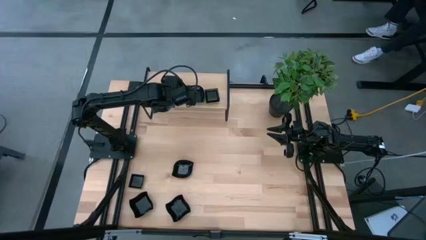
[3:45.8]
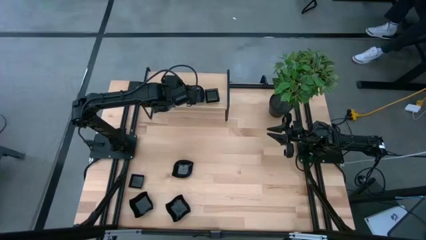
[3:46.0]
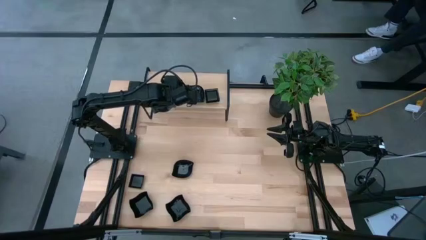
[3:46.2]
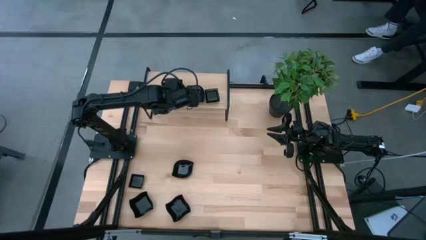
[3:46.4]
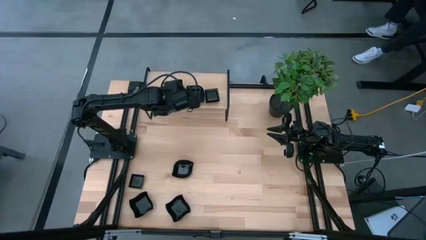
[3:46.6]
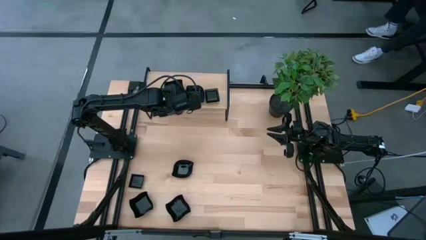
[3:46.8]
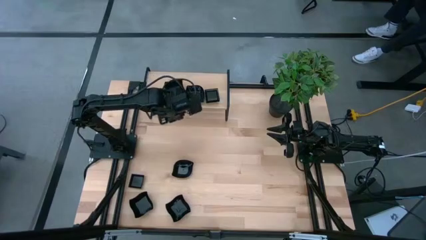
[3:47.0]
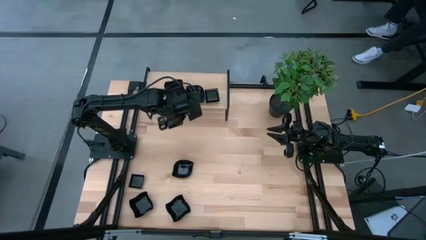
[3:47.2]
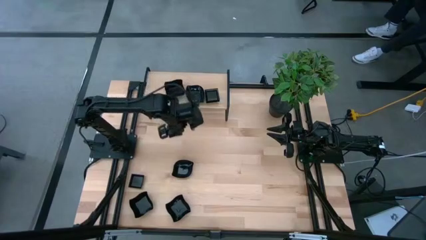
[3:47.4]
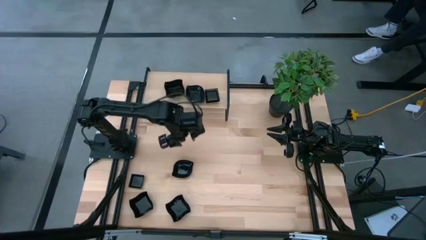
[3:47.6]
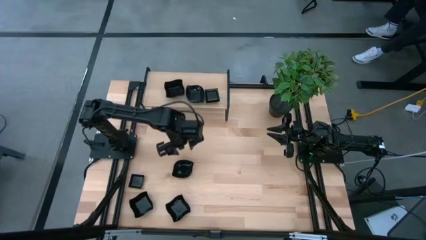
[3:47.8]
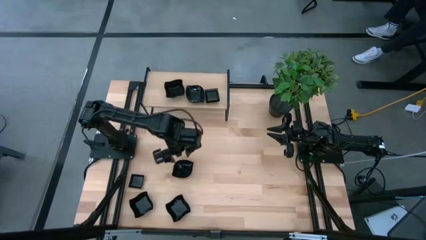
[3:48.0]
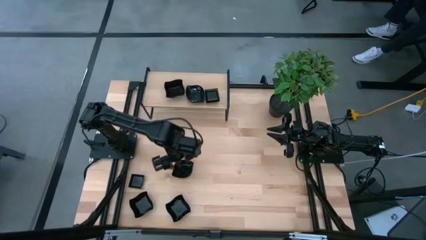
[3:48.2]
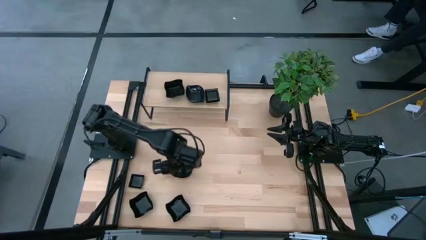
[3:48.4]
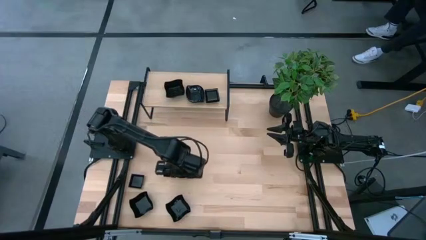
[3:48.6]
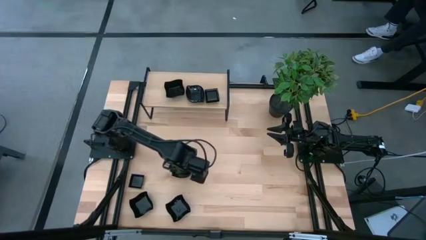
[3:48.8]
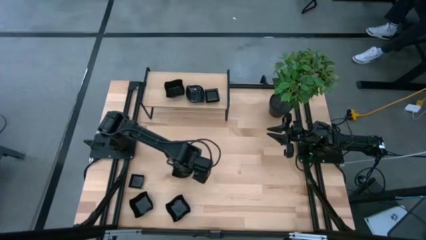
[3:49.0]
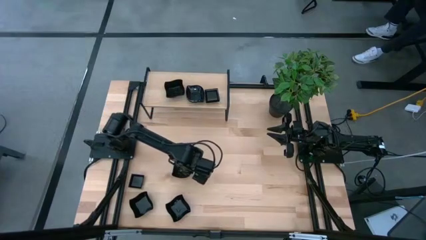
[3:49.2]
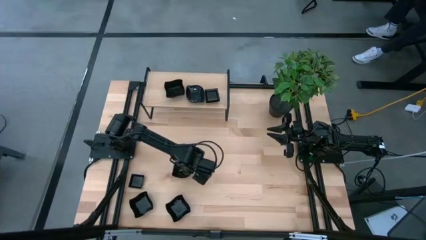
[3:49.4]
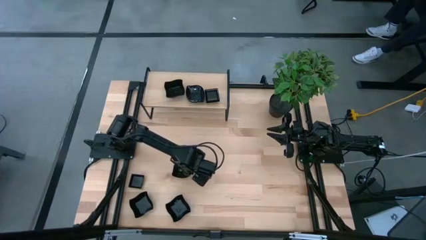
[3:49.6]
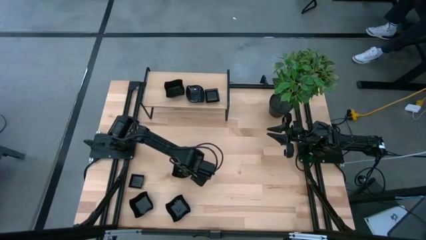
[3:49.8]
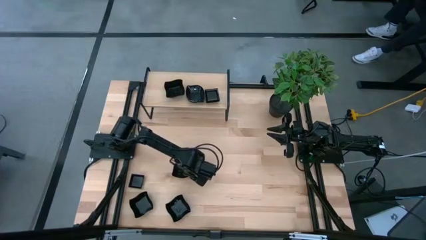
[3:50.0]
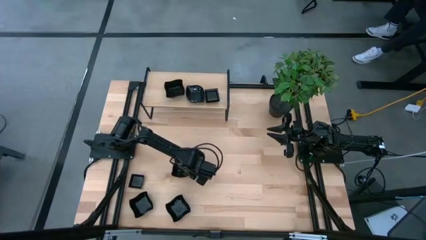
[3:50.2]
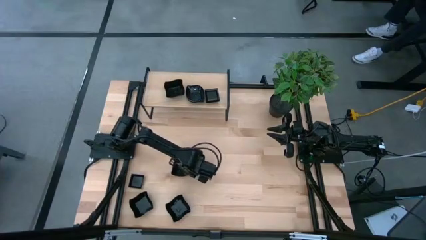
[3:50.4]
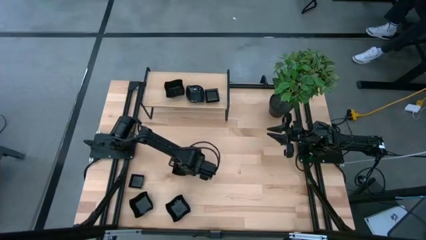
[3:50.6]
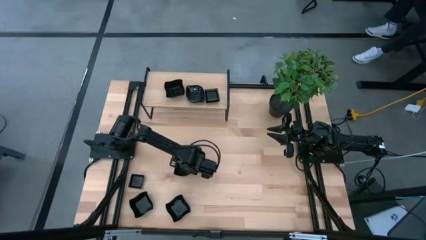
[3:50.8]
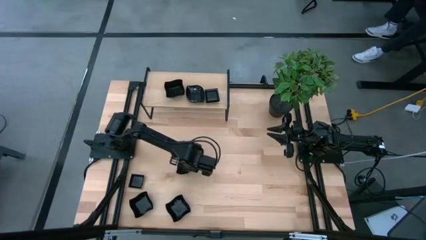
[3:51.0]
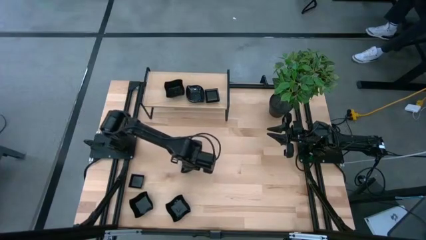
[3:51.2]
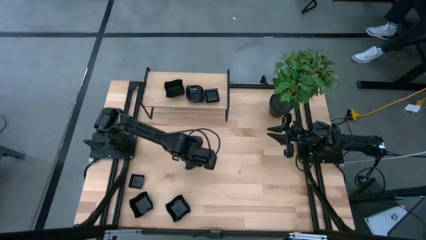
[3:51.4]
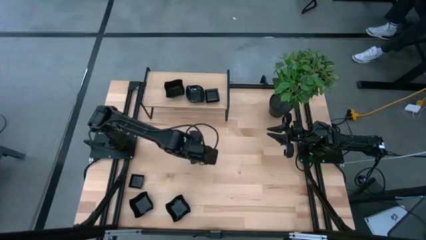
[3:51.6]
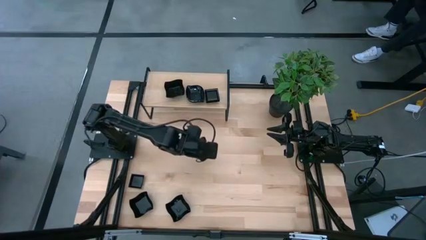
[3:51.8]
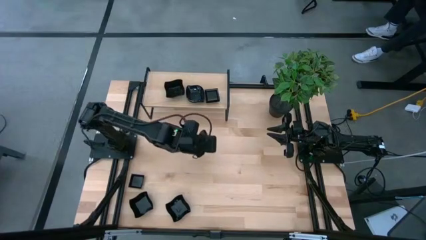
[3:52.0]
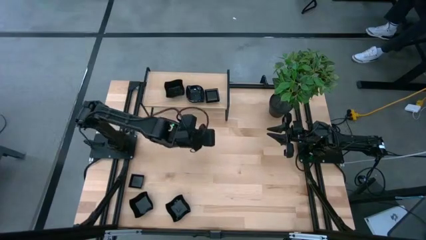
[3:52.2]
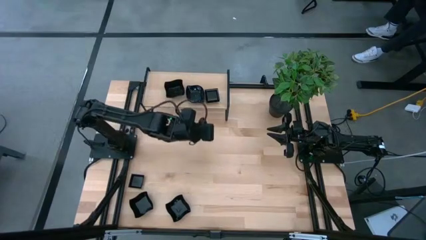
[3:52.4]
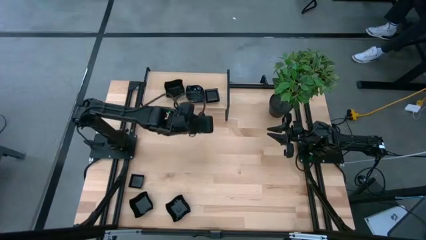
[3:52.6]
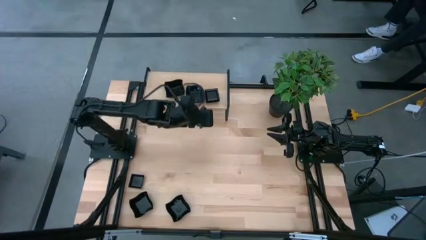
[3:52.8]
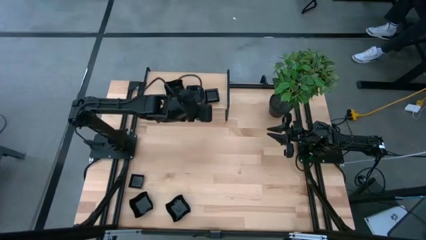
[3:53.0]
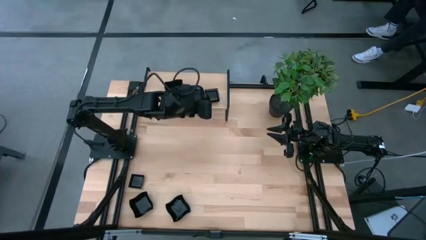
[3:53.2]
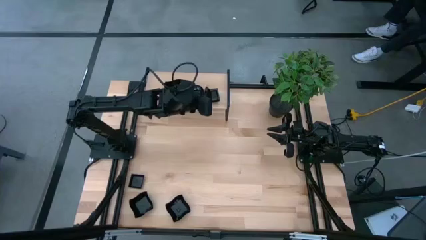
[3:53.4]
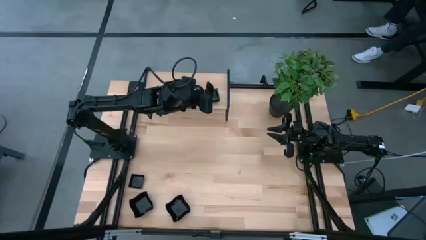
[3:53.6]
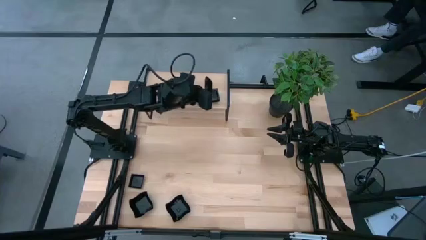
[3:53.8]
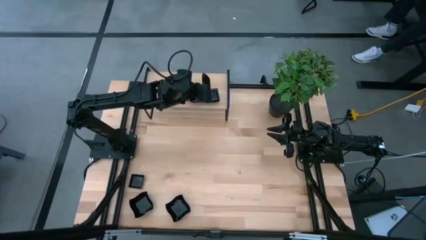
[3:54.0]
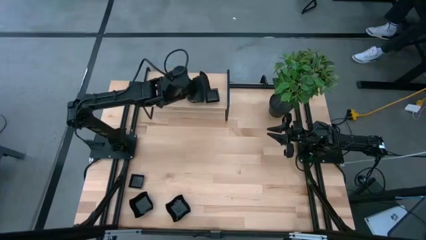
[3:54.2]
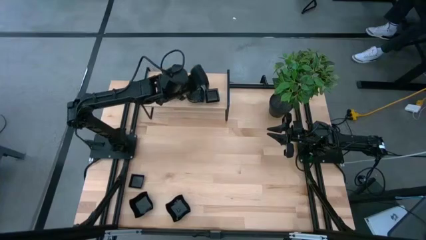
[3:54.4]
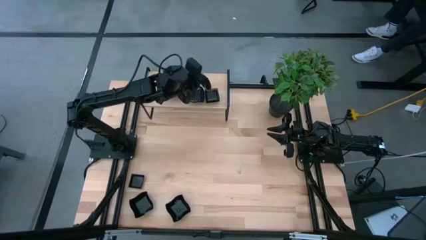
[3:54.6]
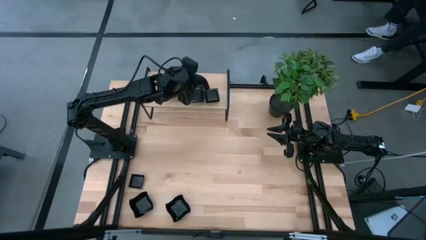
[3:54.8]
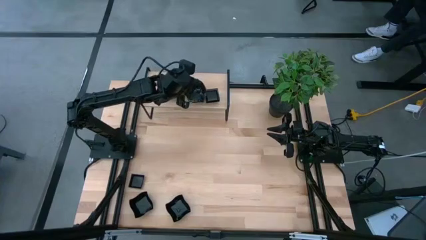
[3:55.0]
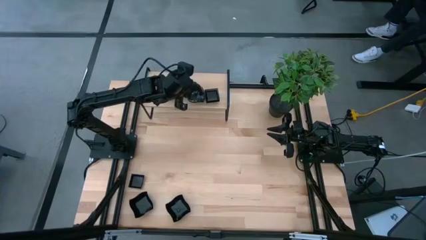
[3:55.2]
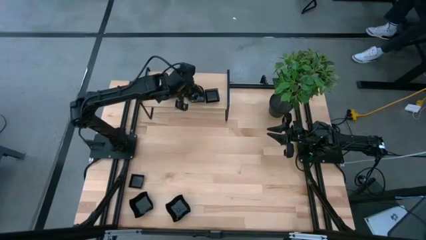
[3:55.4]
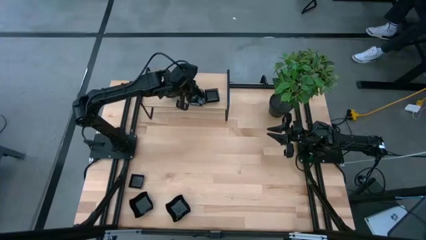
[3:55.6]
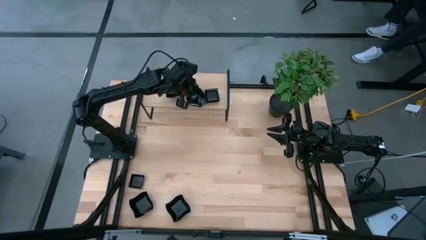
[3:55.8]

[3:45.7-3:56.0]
Task: Pick & Place Mini shaped plates
Stack the leaf shaped plate on top of the leaf shaped plates on the shelf

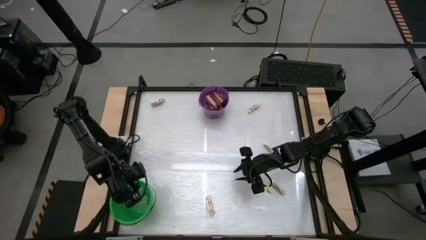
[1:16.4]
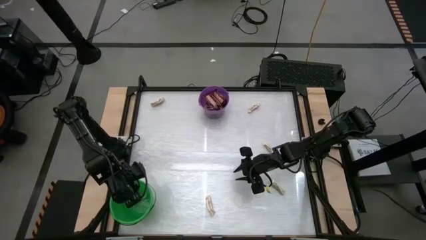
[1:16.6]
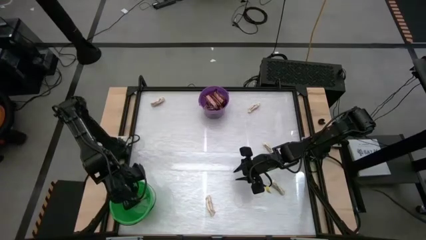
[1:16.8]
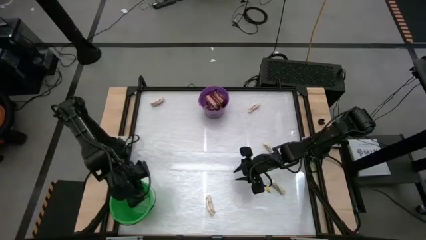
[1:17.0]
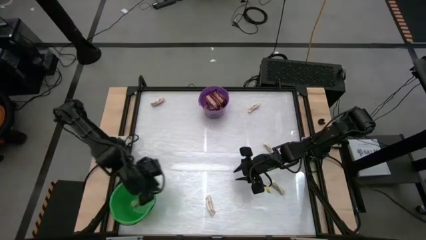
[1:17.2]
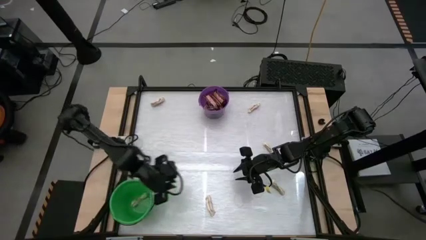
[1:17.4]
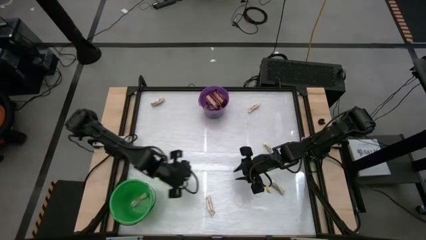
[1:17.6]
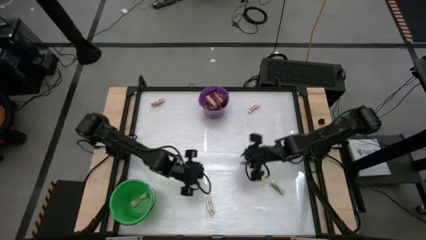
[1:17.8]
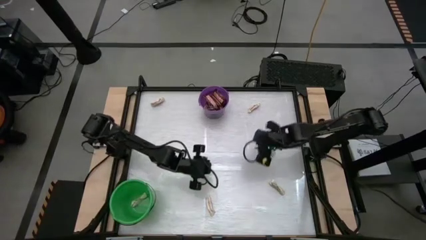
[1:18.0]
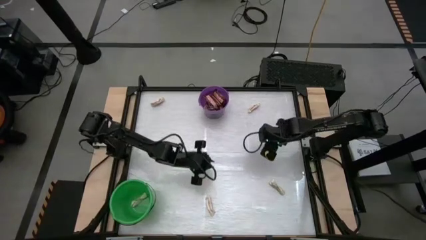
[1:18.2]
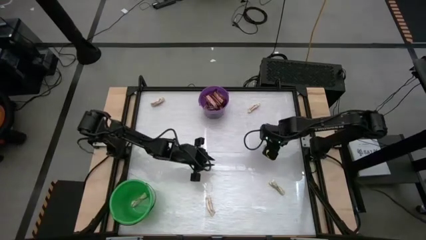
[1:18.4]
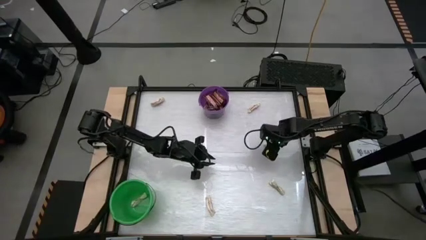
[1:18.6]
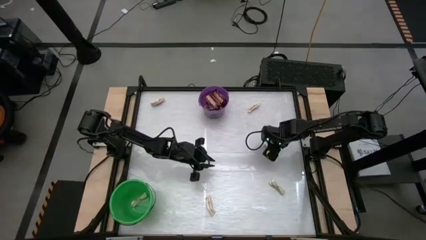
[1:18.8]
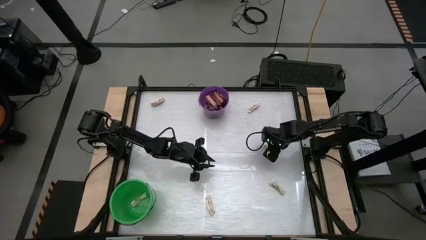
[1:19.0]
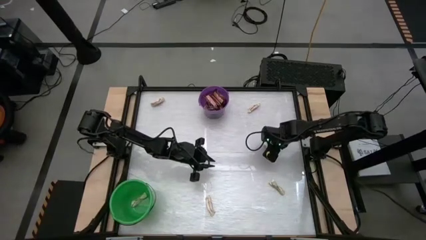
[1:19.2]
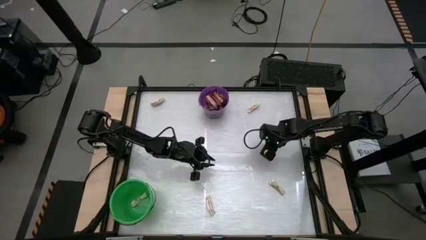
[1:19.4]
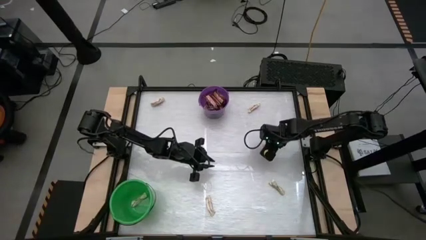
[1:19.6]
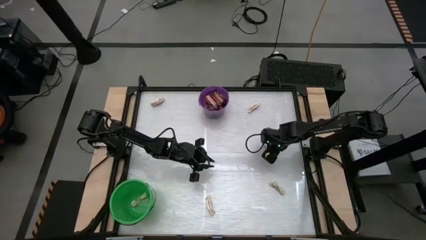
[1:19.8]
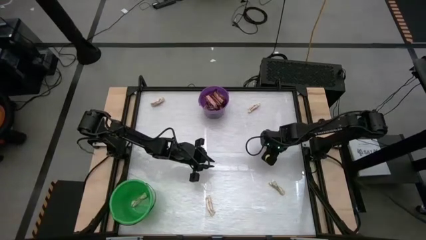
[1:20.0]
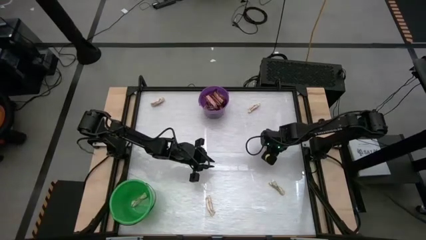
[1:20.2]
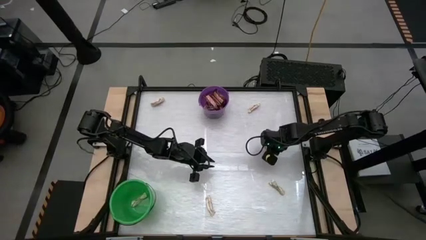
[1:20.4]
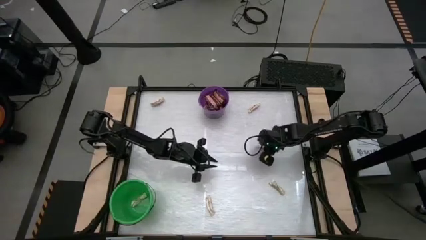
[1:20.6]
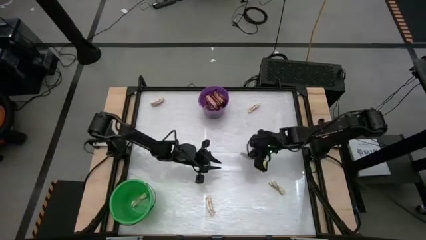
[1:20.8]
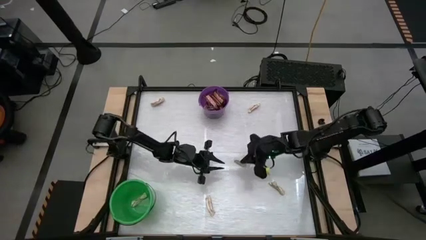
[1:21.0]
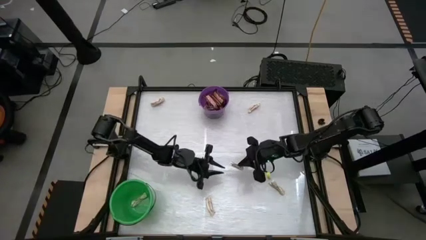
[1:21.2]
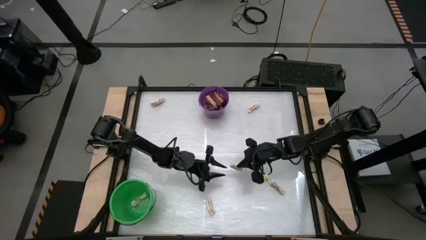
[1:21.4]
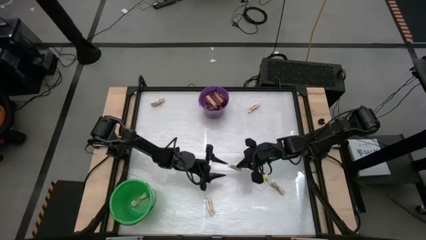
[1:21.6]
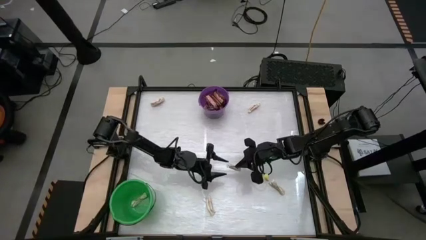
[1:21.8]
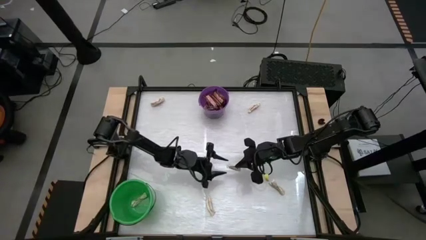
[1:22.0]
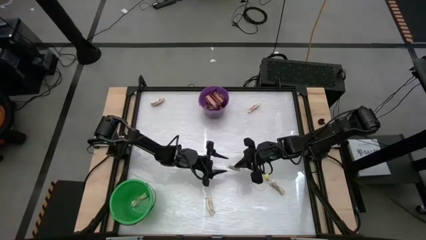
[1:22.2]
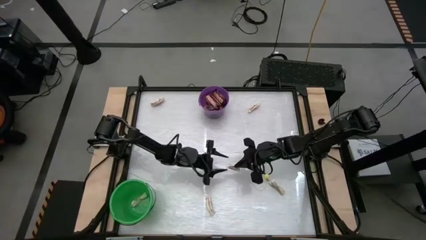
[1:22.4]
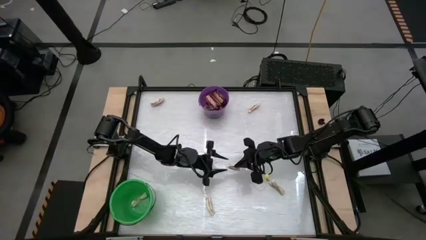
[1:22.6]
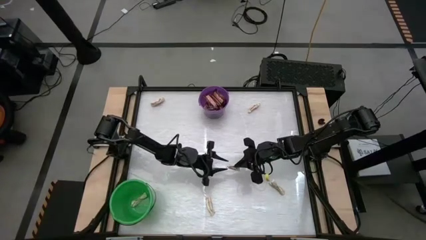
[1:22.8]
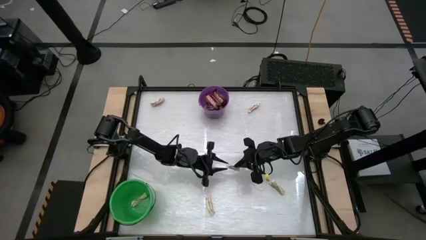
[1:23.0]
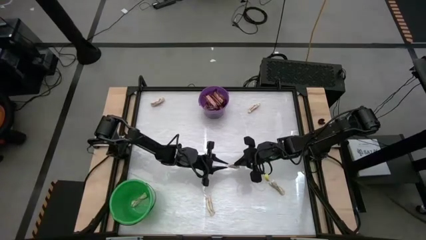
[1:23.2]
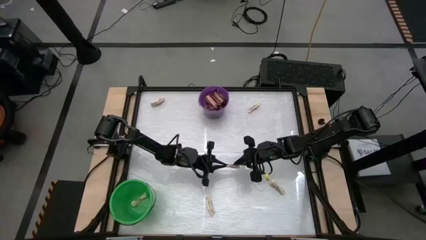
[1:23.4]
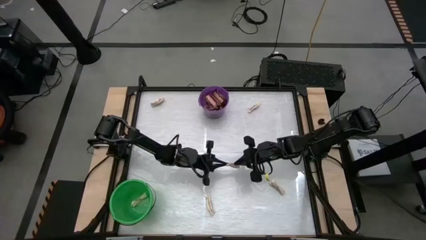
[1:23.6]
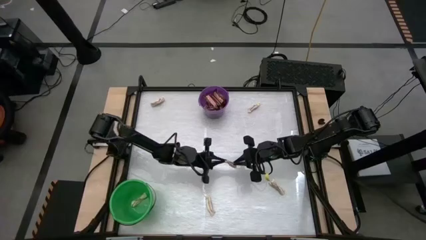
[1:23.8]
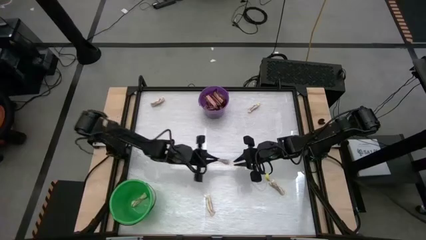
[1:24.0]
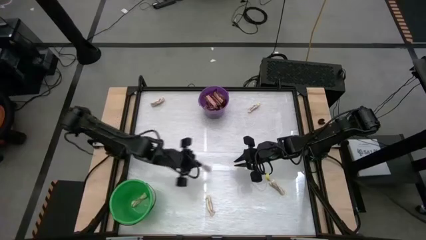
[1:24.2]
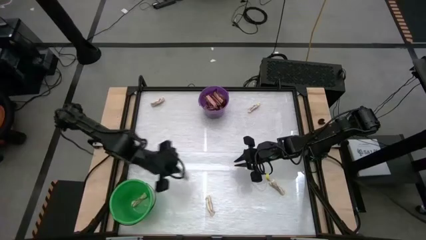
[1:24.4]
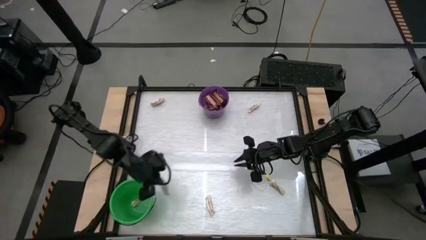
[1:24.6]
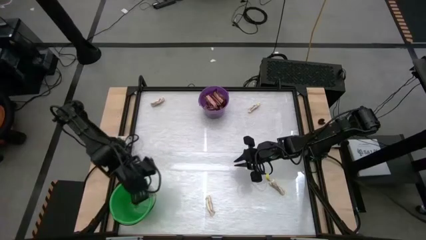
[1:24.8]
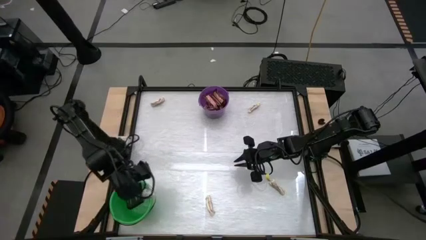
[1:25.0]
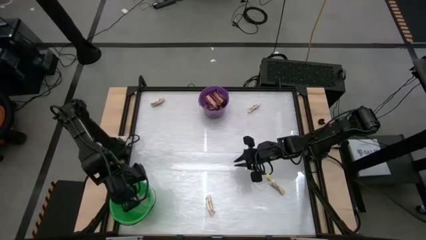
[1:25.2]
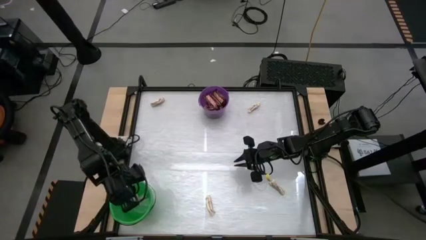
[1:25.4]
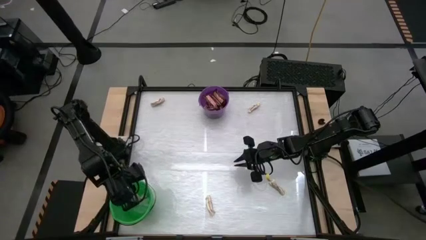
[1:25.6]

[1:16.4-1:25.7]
Task: Sort candy by brand, put in halloween buckets
Put the white chocolate into the green bucket
